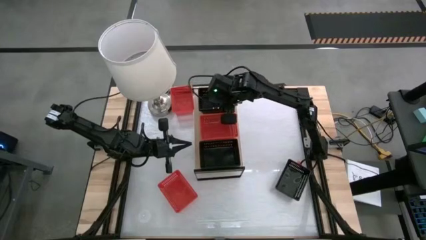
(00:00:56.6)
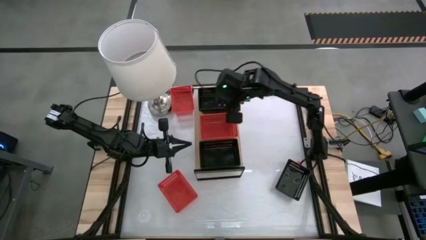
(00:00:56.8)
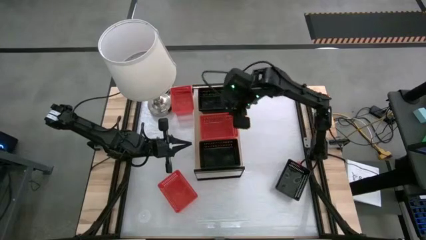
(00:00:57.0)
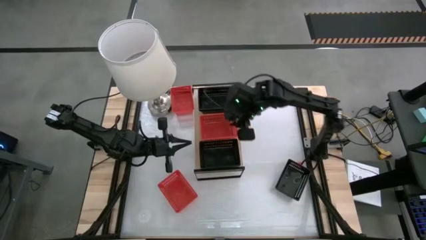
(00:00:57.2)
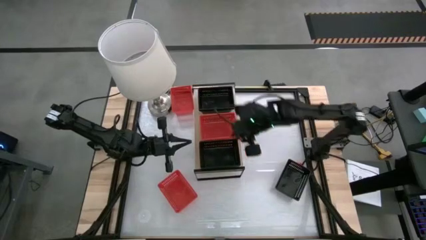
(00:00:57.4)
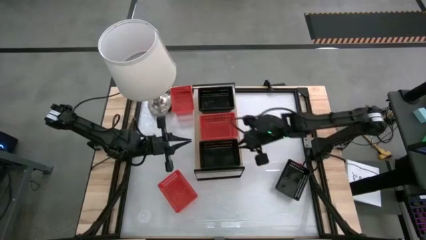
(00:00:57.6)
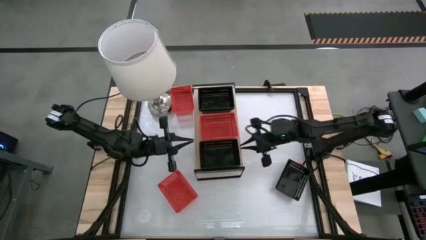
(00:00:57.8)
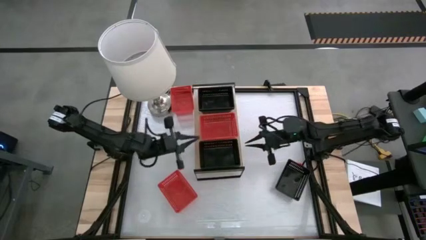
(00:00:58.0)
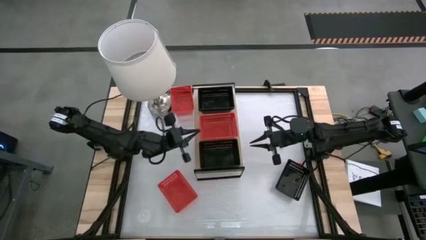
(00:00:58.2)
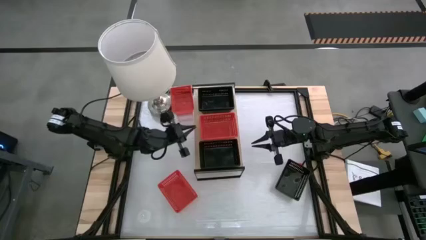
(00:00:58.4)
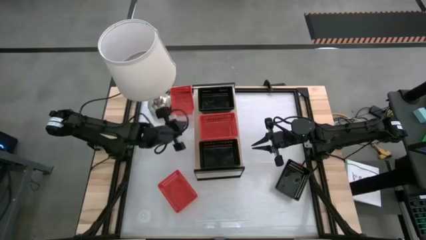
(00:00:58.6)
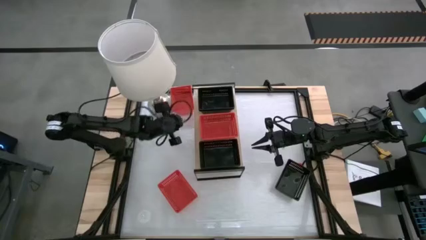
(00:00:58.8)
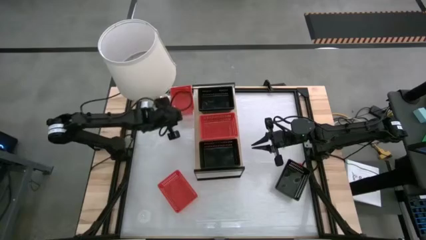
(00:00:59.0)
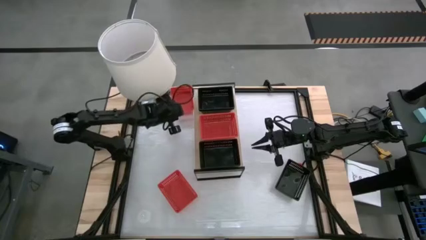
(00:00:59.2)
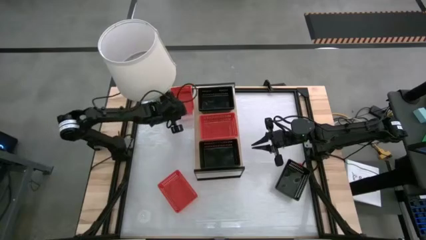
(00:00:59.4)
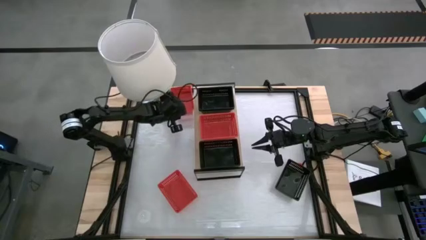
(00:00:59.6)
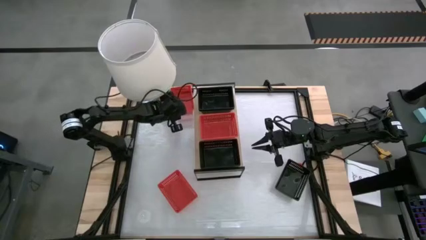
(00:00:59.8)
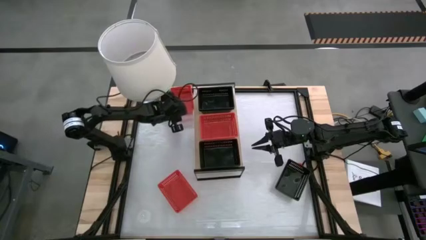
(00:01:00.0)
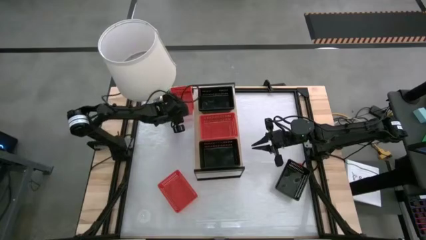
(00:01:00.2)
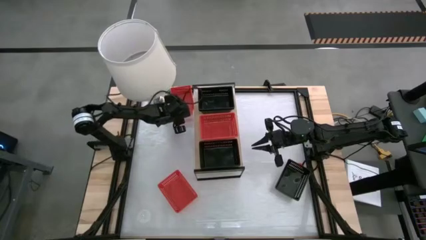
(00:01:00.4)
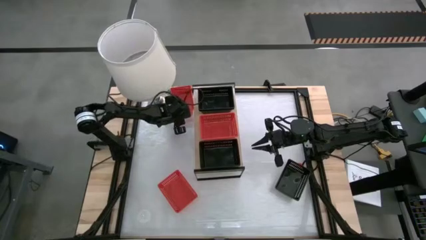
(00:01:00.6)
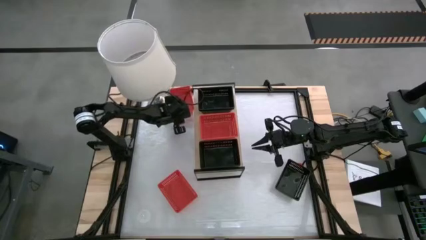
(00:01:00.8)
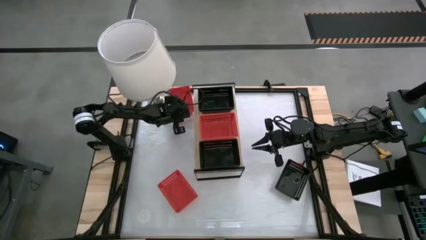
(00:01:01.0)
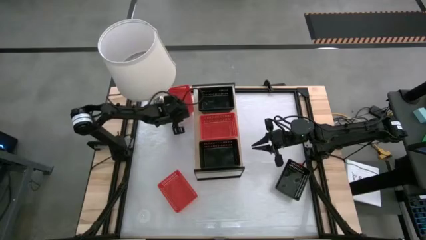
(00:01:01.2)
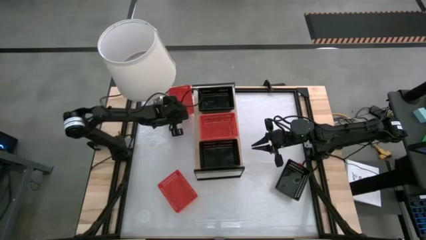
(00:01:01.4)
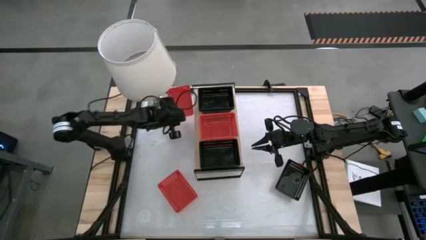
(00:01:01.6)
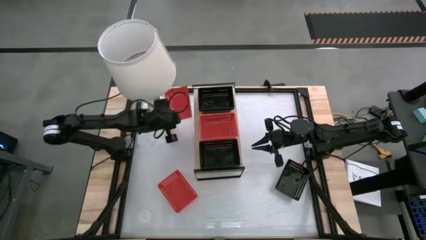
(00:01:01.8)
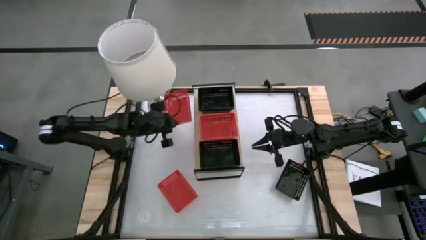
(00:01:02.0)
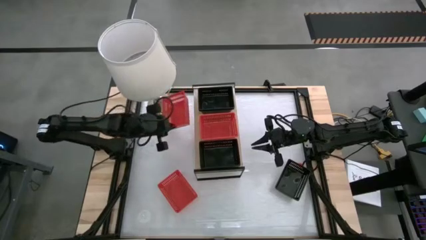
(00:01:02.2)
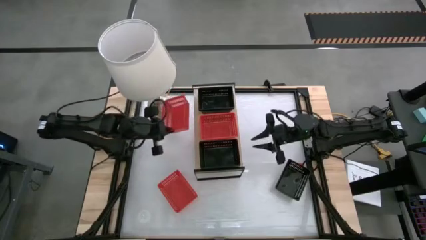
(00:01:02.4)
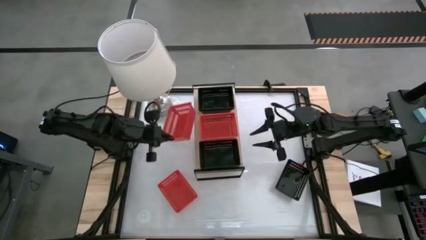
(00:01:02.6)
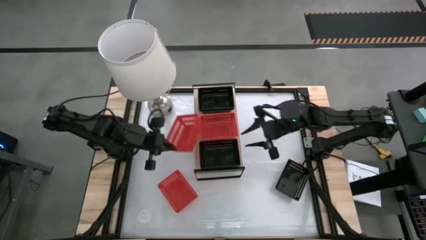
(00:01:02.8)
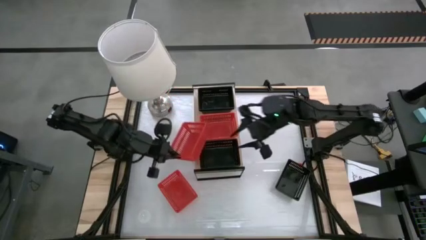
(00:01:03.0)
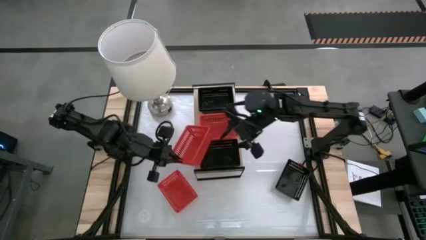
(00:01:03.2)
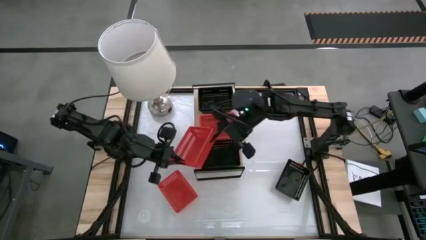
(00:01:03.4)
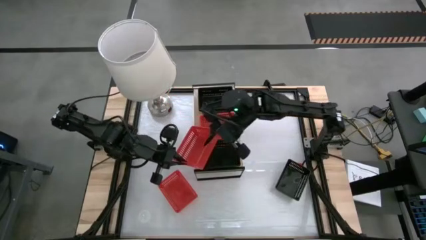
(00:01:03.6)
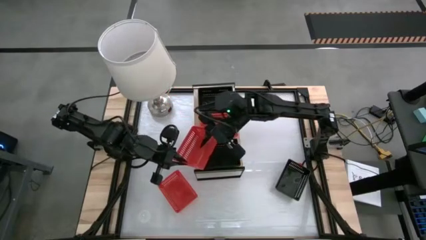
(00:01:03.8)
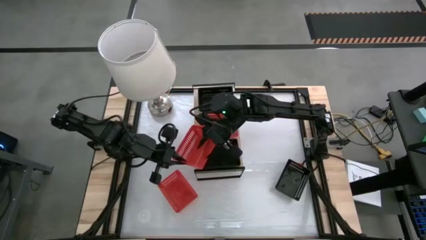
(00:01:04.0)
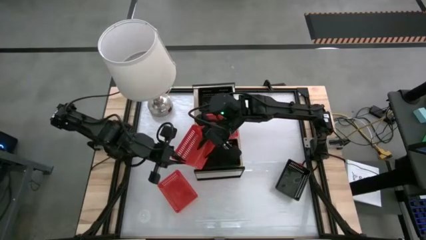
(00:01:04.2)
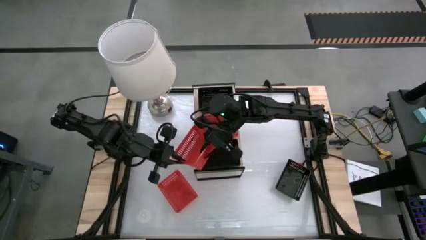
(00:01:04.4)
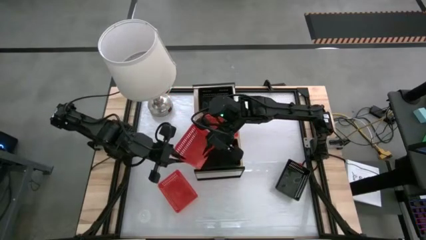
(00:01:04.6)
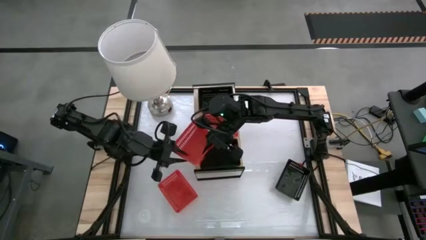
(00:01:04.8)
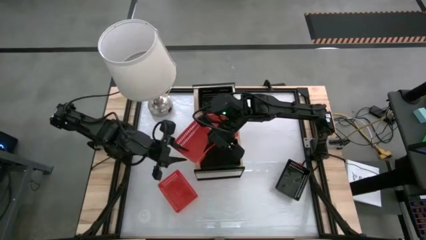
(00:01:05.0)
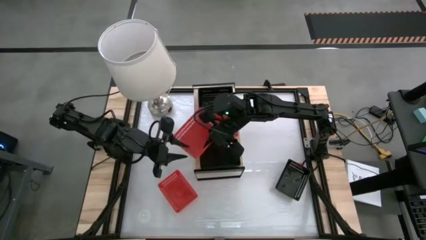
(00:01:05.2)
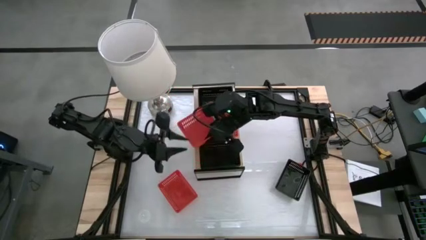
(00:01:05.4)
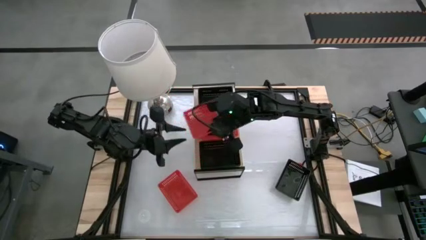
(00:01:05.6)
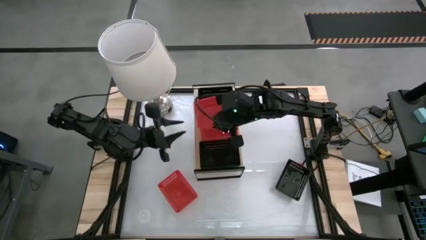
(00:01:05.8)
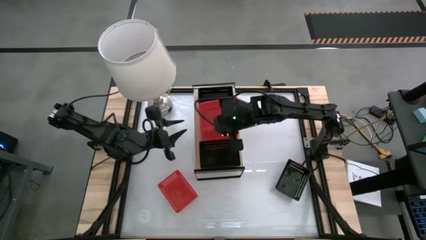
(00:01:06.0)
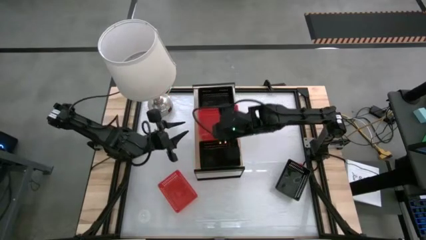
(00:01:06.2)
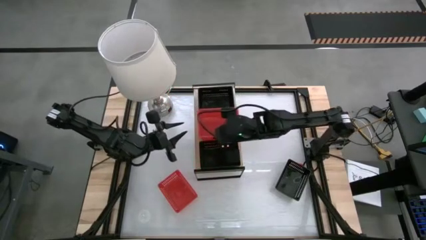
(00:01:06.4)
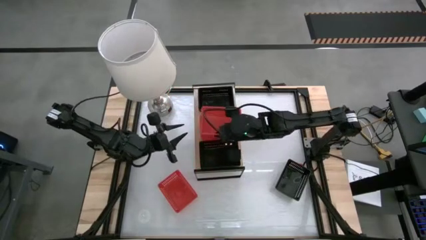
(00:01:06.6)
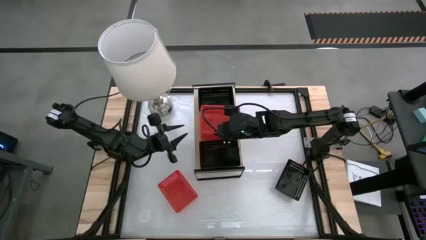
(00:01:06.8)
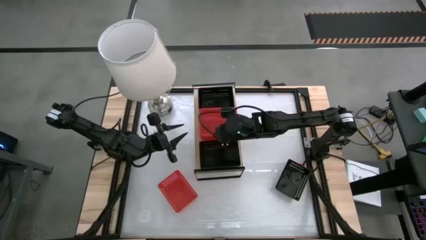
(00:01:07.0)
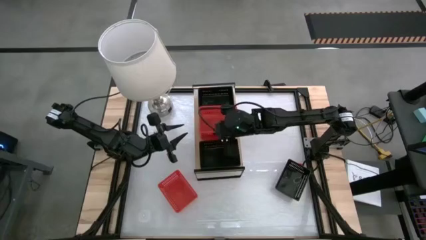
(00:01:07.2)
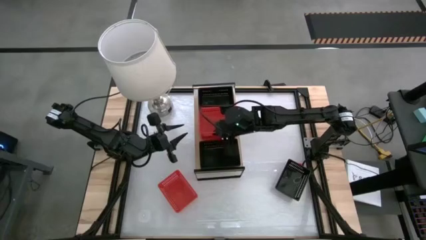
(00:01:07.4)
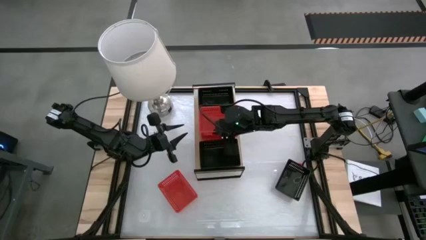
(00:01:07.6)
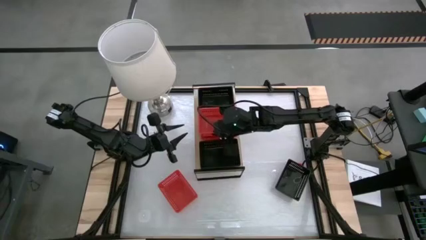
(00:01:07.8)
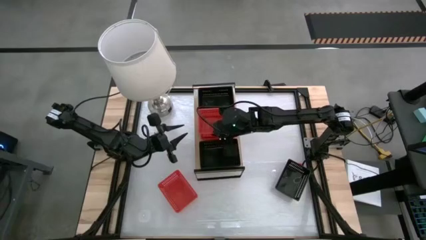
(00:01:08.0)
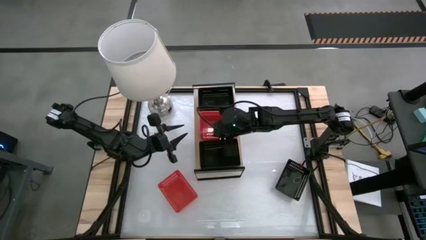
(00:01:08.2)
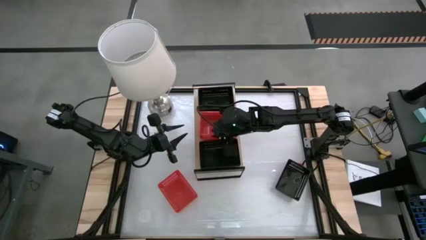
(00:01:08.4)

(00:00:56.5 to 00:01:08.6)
Task: Stack baskets on shelf by color
Stack the red bin on the red bin on the shelf

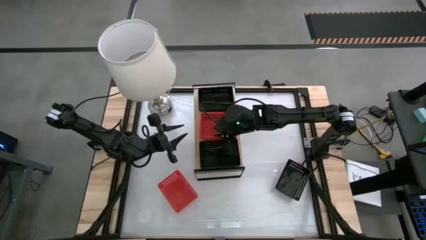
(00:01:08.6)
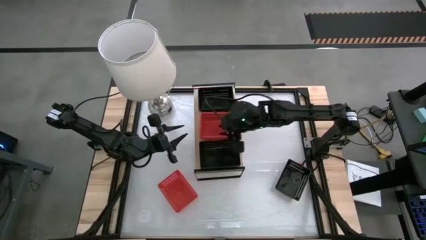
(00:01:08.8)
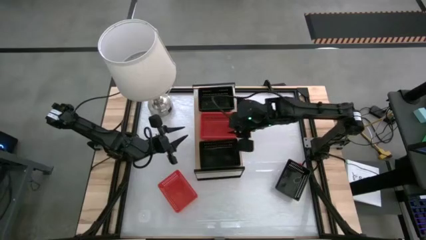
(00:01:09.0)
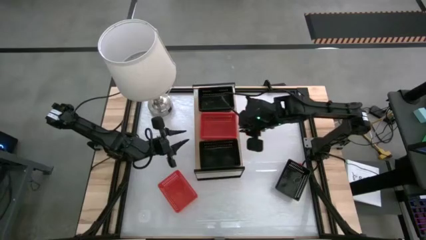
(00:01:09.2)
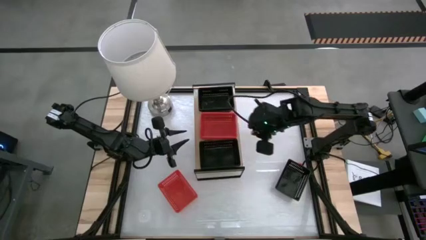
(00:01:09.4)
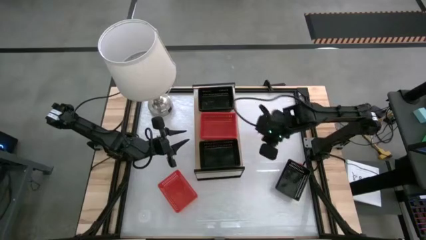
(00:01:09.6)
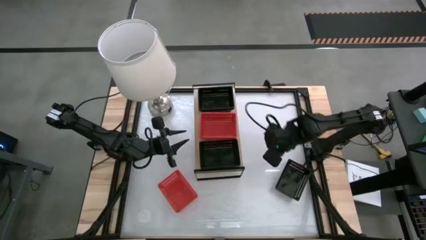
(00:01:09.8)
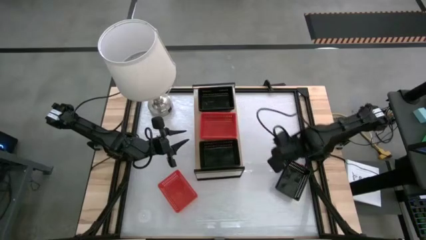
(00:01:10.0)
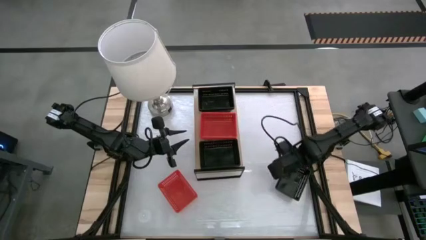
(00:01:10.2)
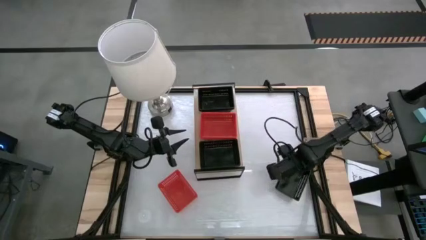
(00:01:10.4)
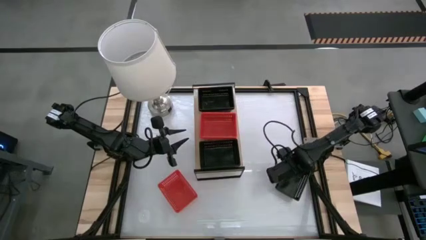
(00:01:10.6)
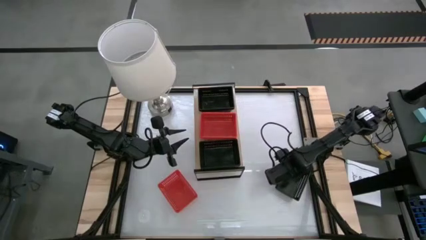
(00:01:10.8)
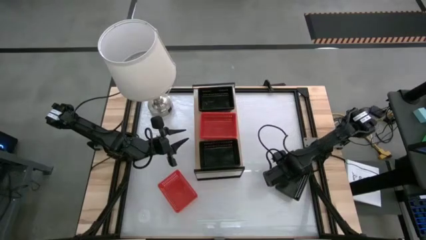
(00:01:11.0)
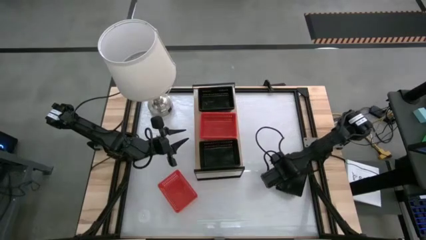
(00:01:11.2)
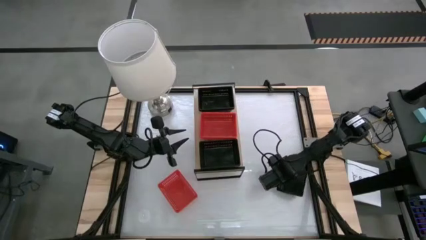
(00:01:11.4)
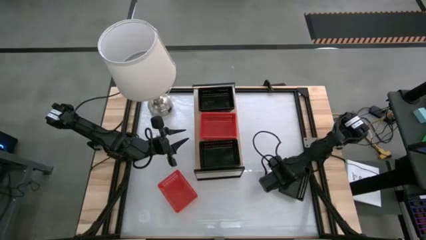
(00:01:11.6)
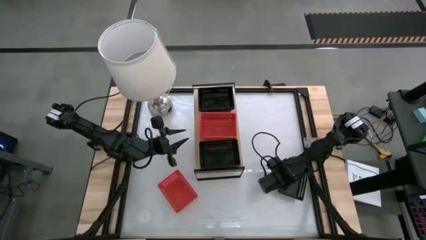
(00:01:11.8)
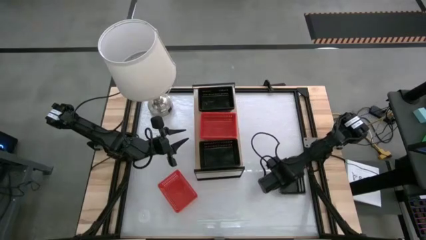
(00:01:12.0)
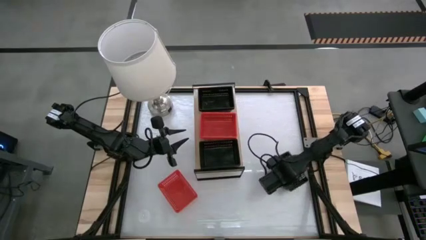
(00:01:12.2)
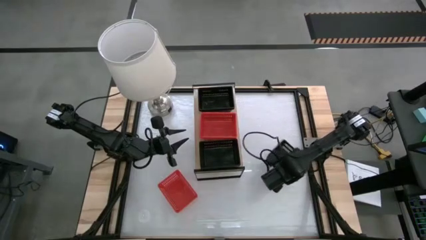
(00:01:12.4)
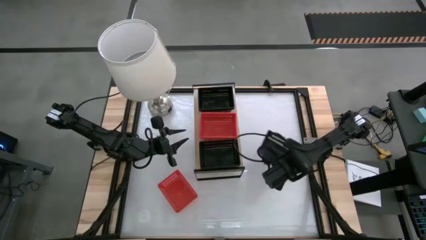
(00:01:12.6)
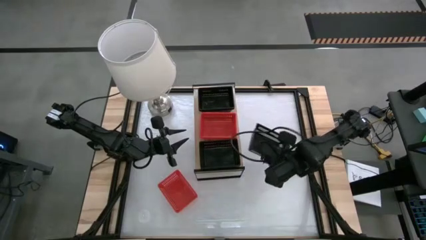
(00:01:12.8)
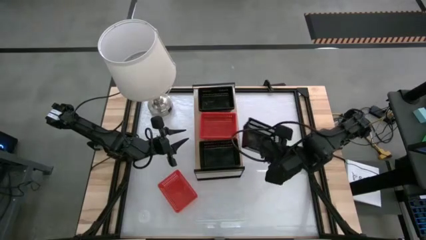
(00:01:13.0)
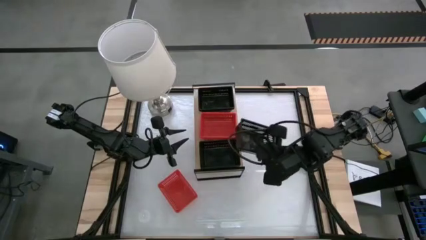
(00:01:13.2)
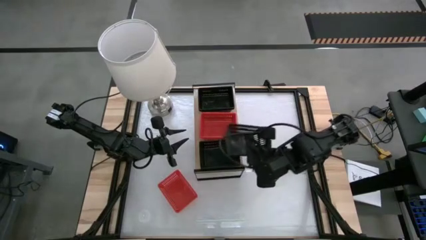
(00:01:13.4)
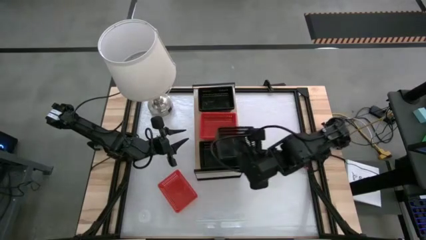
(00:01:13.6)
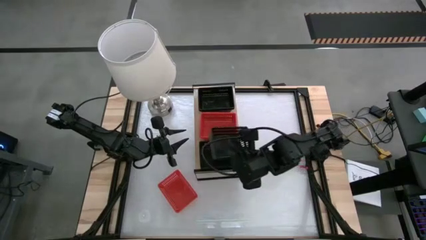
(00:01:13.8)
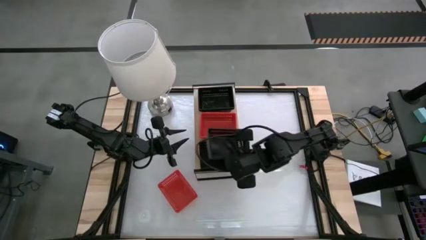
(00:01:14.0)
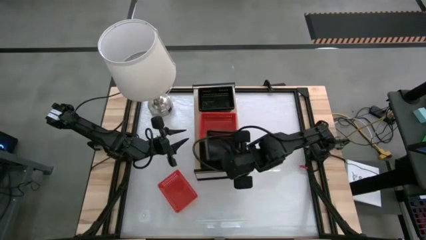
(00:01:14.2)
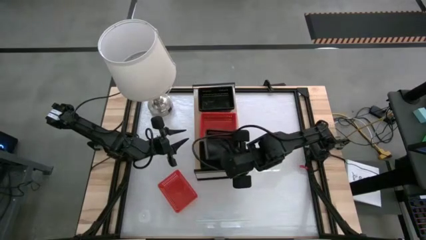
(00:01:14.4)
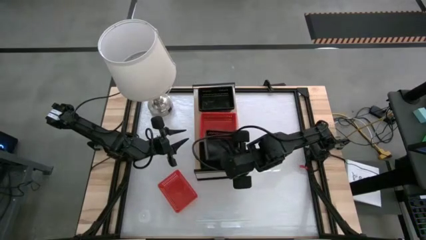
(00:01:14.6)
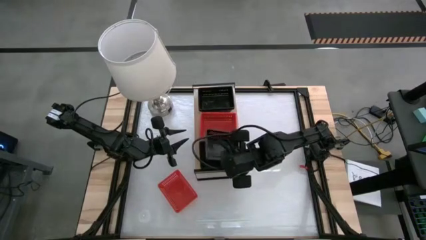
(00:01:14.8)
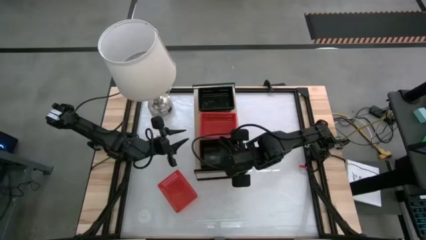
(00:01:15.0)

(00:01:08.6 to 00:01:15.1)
Stack the black bin on the bottom black bin on the shelf
